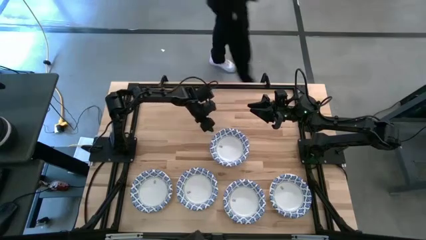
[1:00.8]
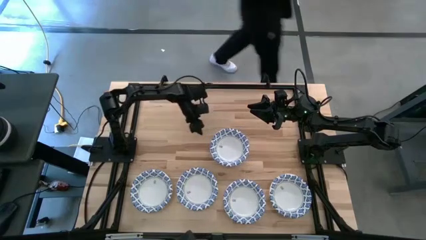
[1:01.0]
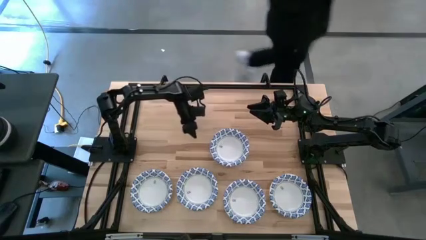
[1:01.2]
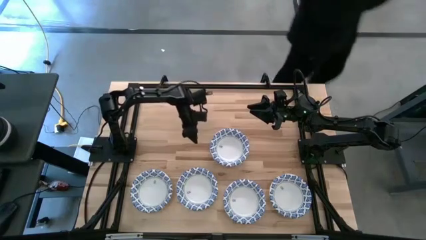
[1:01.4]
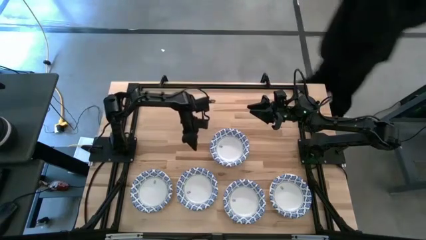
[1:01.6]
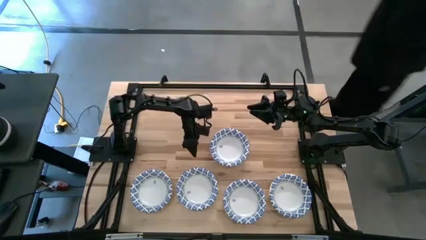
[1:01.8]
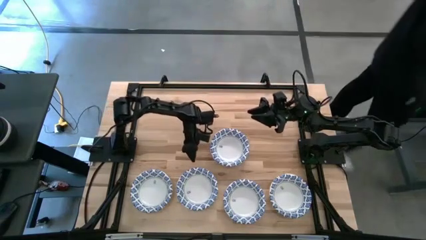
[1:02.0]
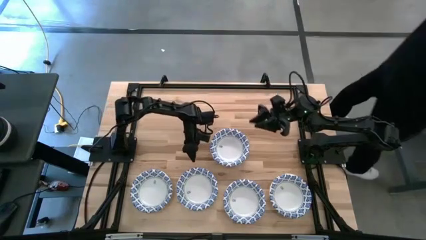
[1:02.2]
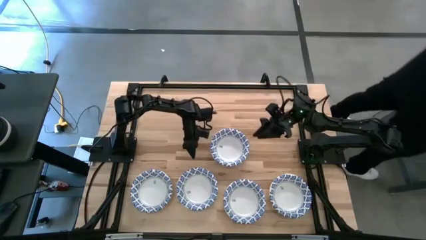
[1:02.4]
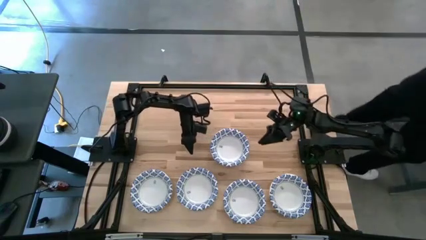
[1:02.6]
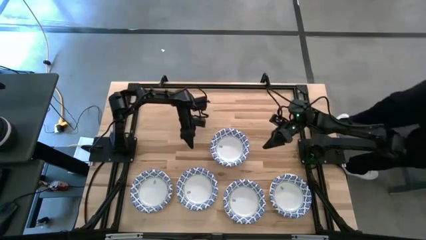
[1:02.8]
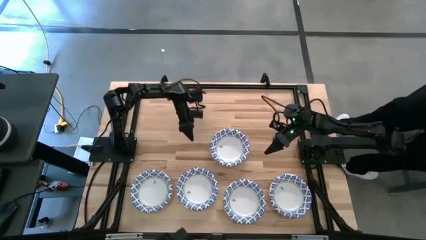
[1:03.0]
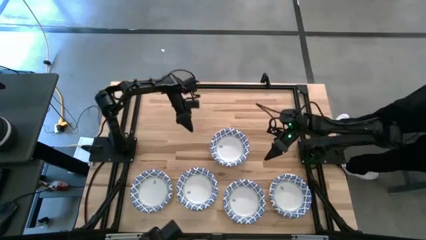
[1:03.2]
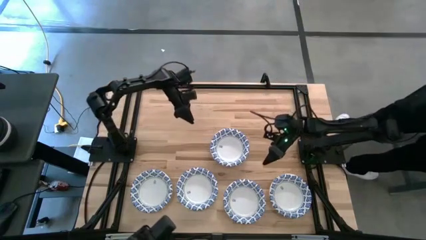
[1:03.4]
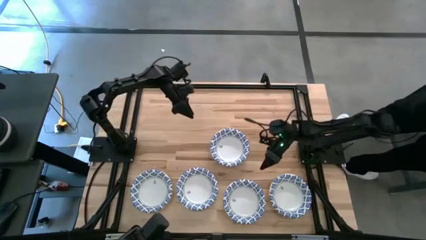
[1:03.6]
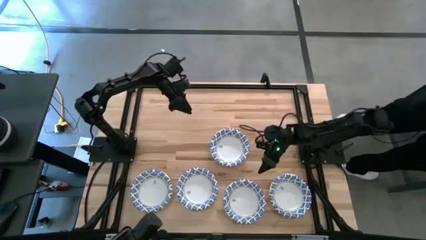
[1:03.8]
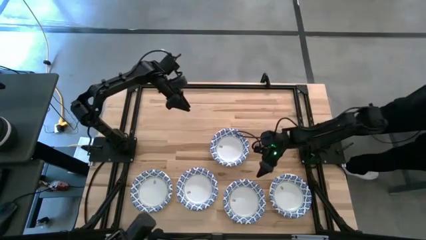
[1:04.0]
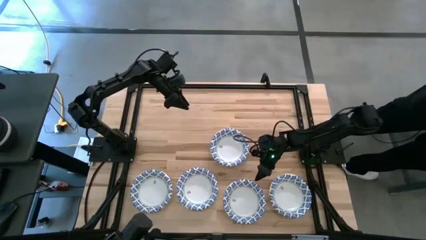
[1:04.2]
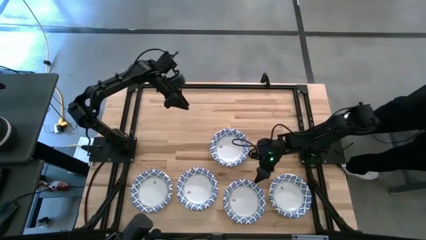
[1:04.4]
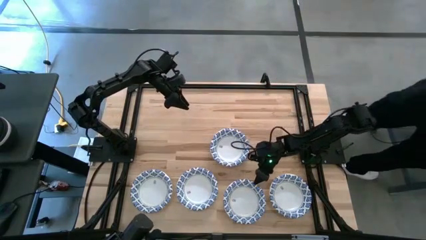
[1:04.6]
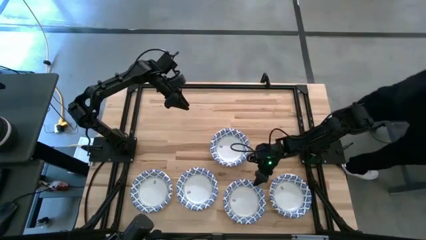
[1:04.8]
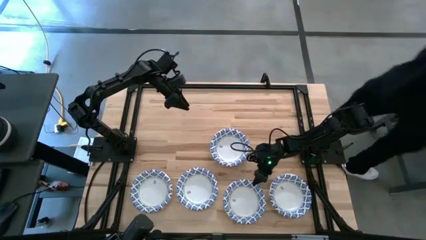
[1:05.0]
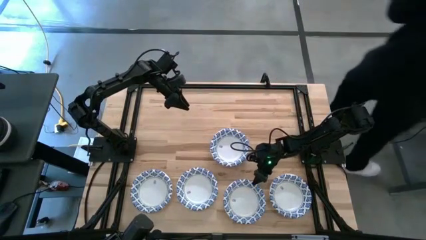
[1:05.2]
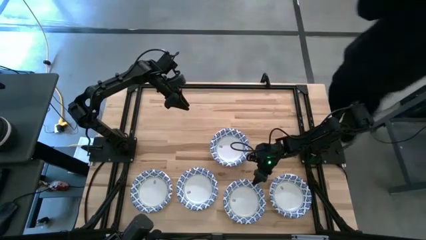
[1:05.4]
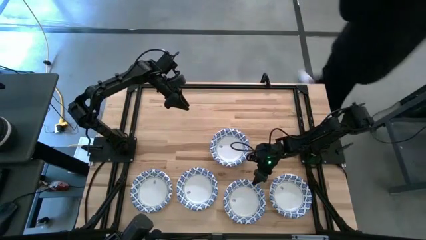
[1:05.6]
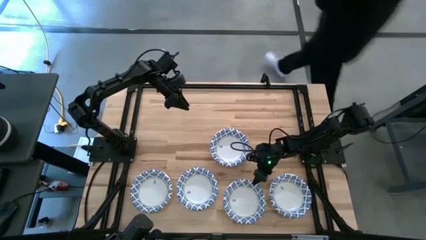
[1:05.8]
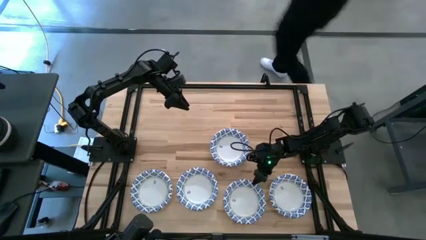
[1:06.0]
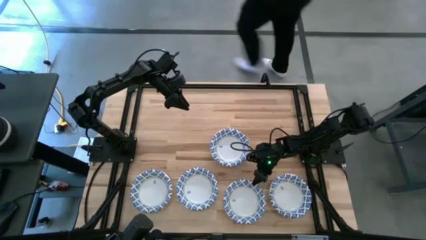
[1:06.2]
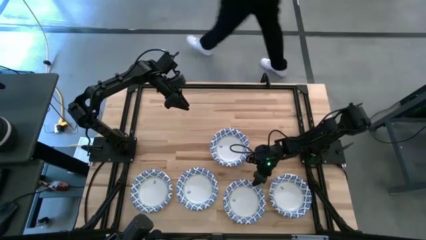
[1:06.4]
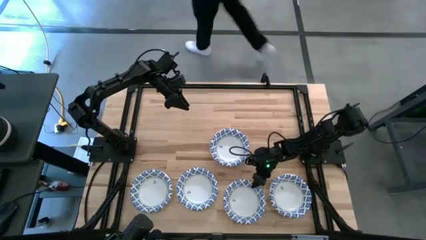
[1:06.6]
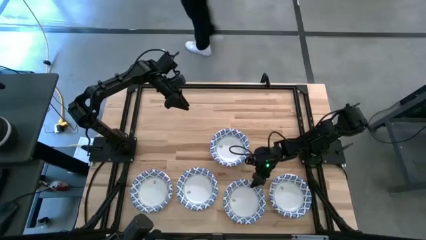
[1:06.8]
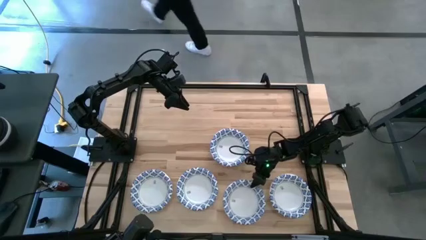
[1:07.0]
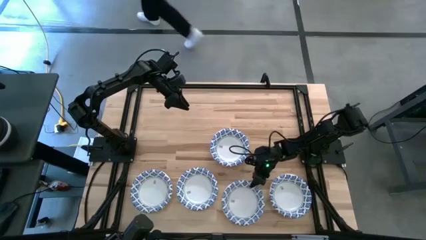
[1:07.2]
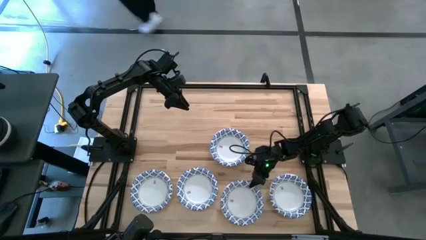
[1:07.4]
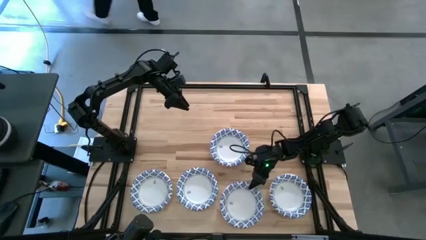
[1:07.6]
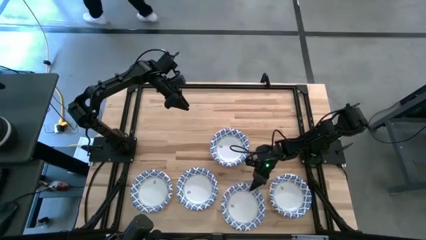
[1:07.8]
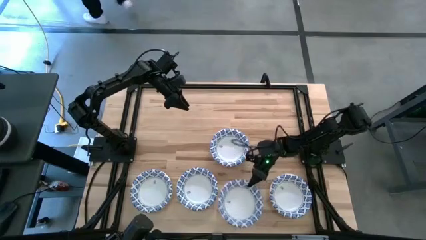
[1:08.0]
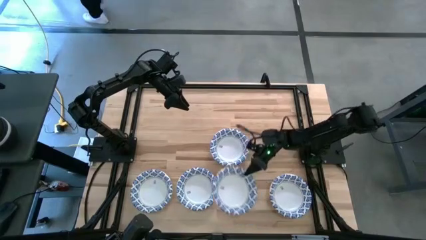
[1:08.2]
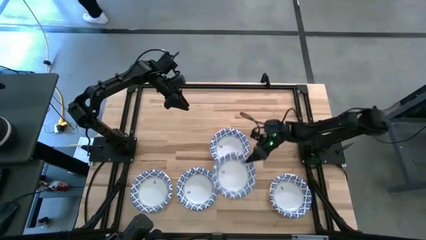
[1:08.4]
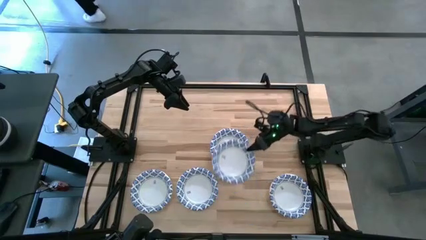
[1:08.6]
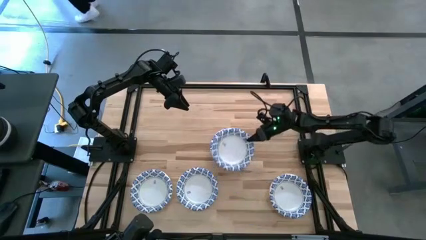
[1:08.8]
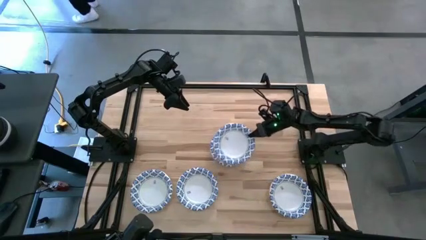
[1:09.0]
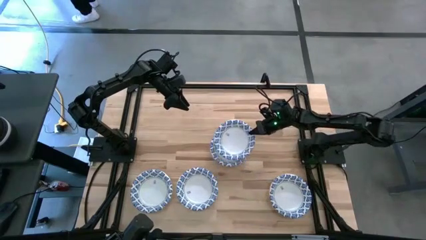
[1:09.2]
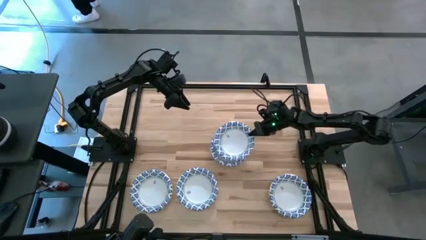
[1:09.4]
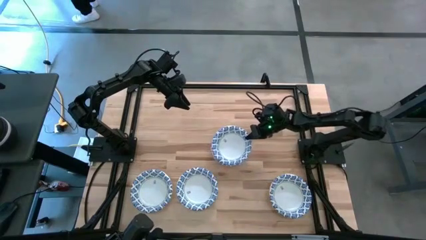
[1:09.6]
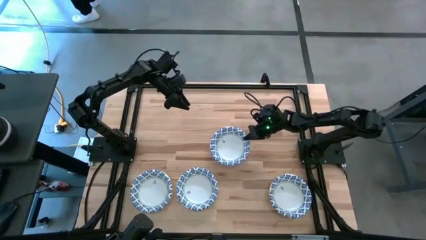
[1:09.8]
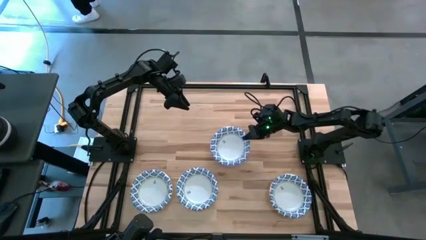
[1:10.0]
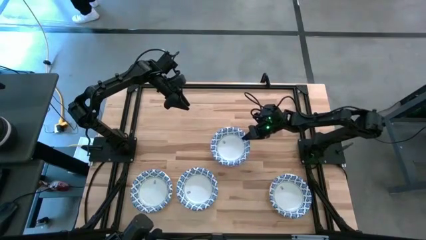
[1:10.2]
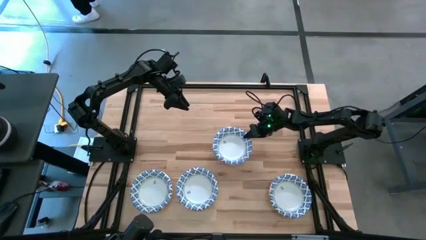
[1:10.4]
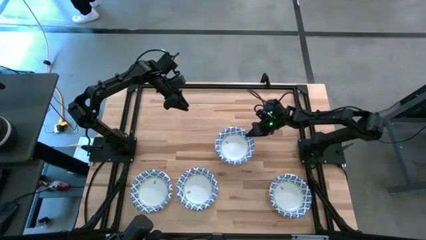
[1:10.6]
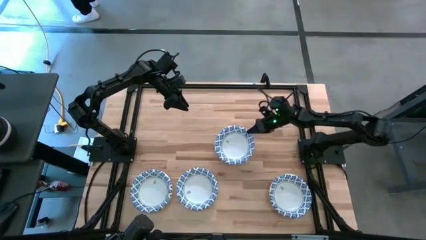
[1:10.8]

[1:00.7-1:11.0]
Task: Nest bowls inside each other
Stack the white patterned bowl on top of the other white patterned bowl

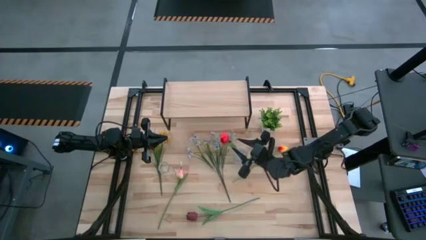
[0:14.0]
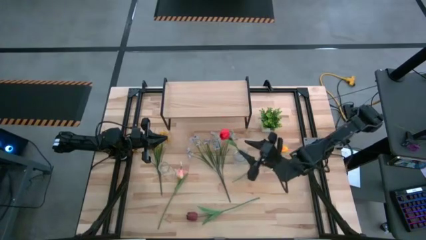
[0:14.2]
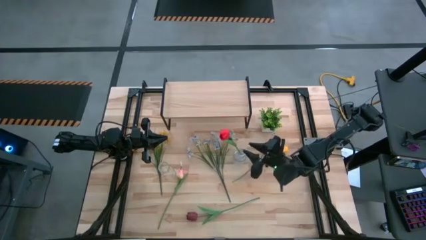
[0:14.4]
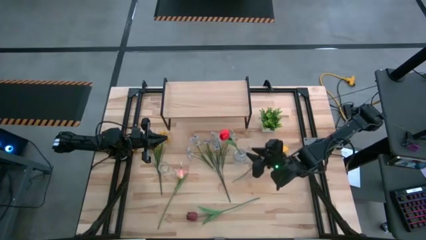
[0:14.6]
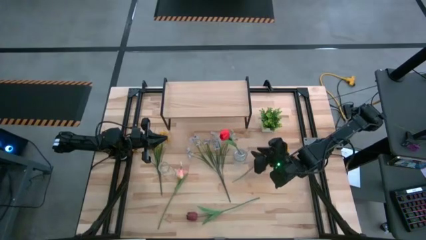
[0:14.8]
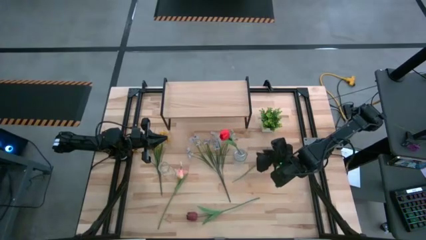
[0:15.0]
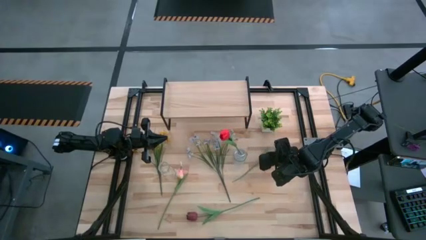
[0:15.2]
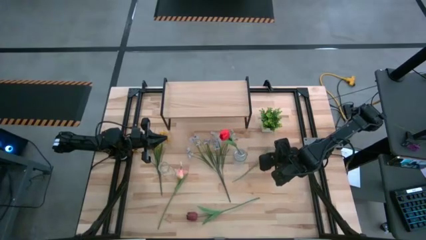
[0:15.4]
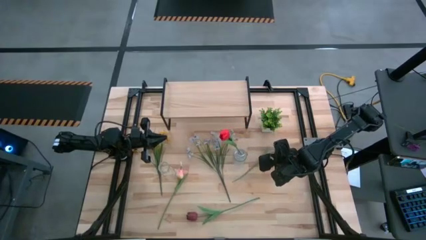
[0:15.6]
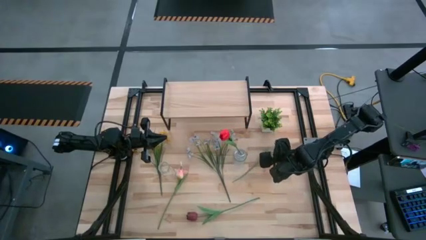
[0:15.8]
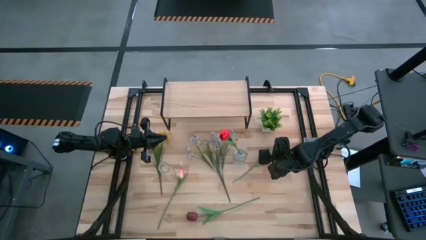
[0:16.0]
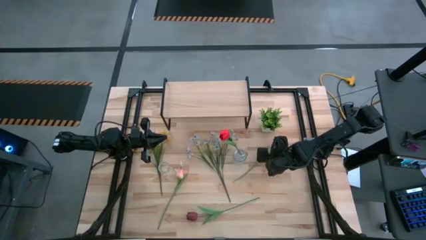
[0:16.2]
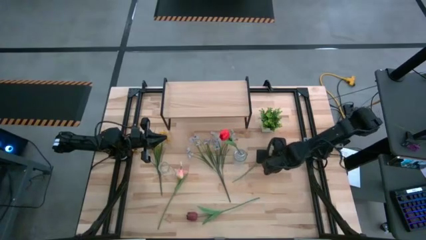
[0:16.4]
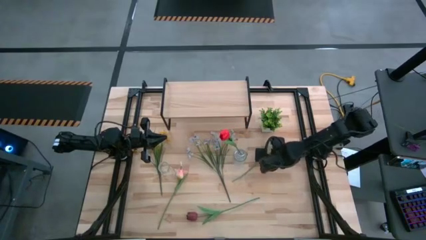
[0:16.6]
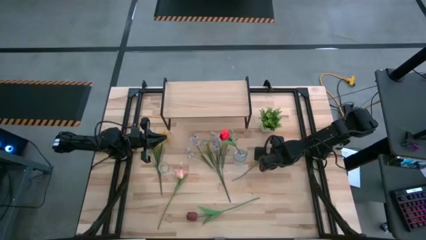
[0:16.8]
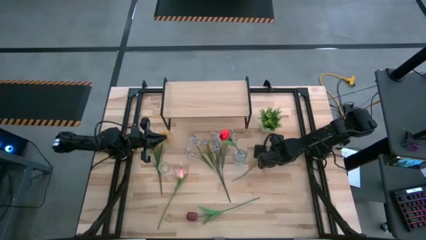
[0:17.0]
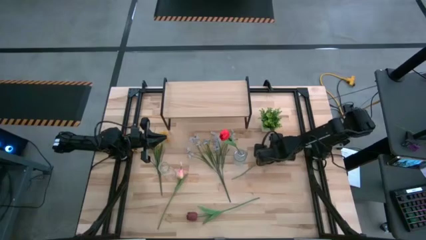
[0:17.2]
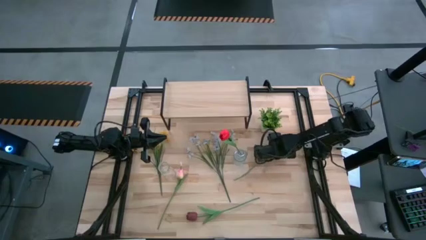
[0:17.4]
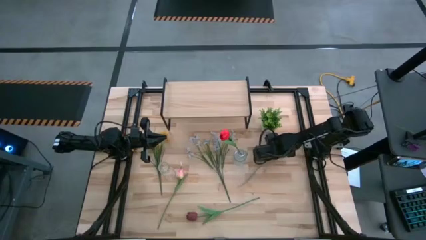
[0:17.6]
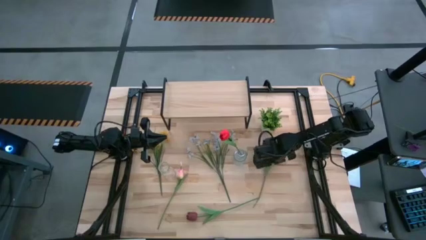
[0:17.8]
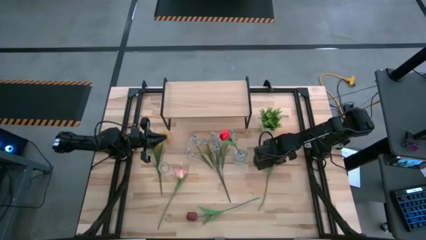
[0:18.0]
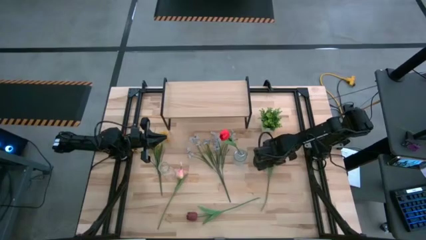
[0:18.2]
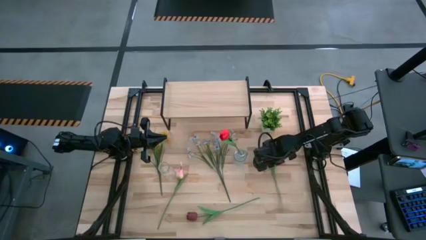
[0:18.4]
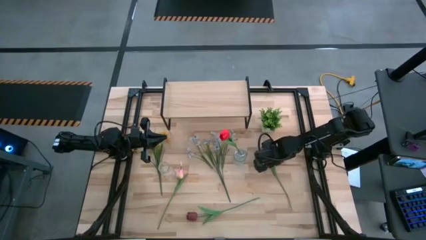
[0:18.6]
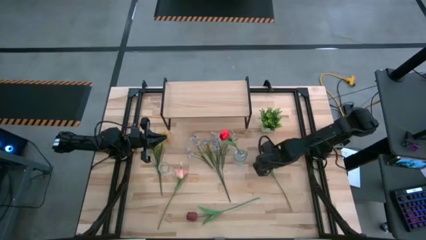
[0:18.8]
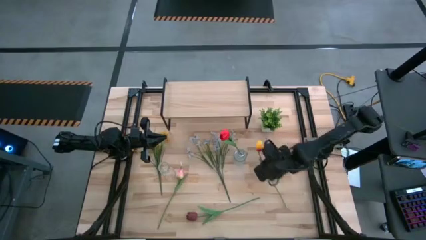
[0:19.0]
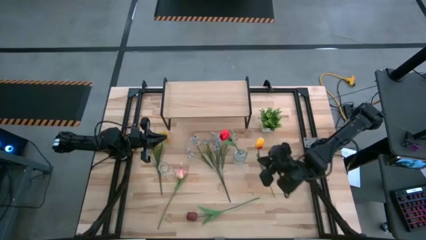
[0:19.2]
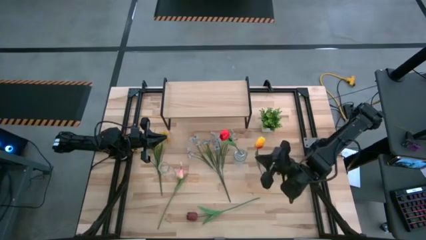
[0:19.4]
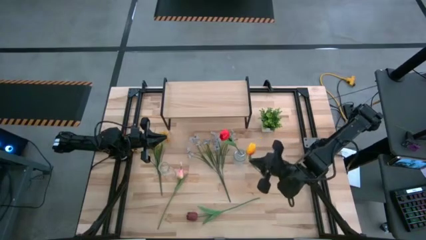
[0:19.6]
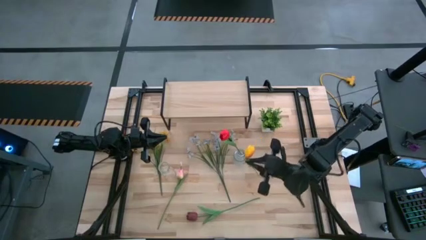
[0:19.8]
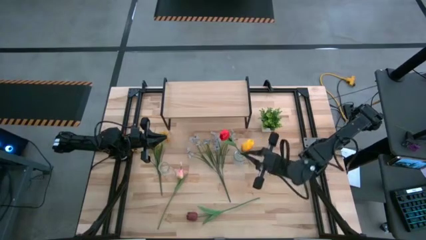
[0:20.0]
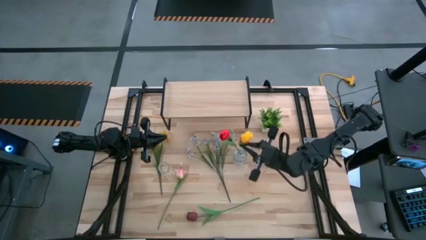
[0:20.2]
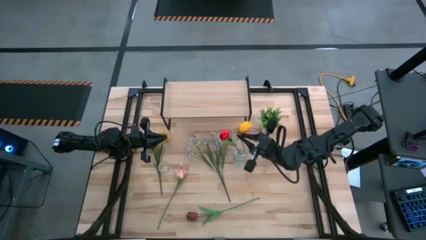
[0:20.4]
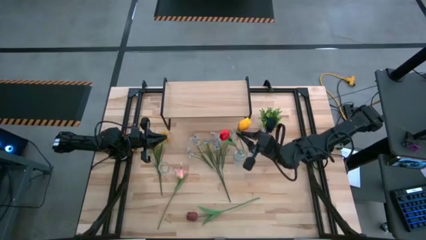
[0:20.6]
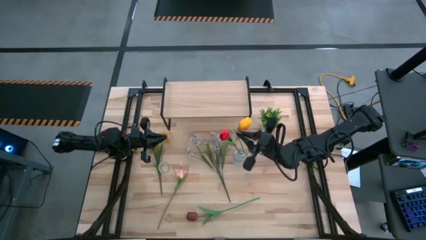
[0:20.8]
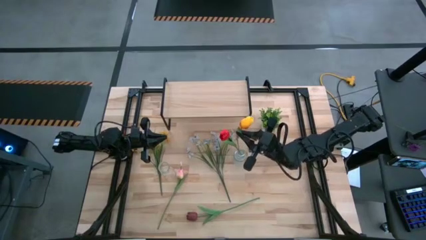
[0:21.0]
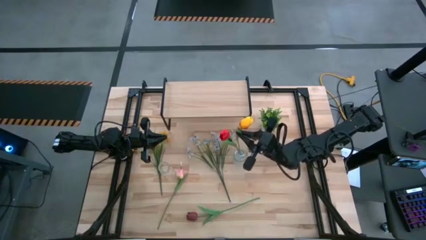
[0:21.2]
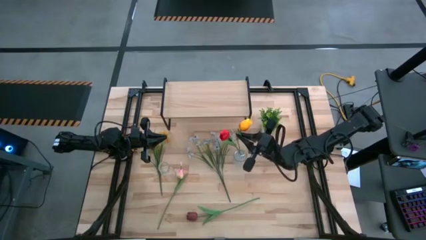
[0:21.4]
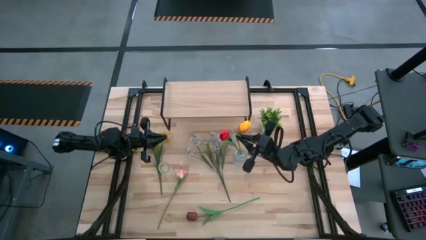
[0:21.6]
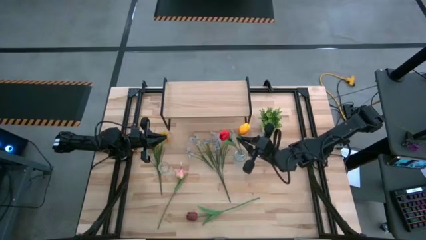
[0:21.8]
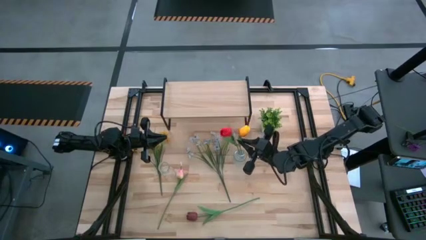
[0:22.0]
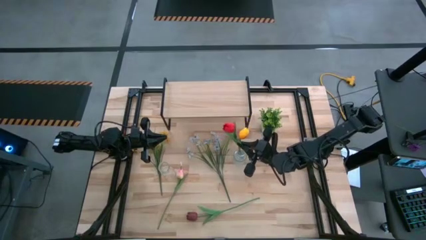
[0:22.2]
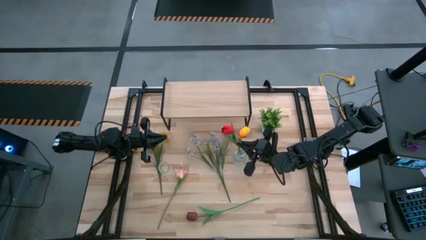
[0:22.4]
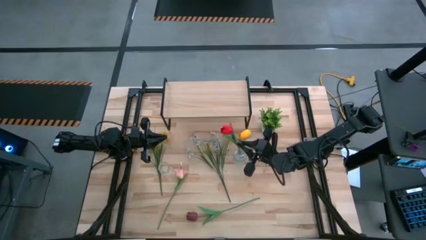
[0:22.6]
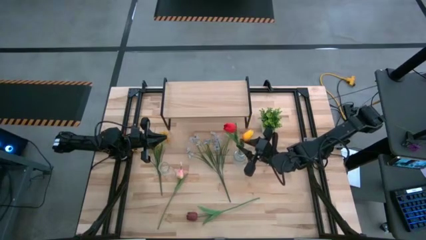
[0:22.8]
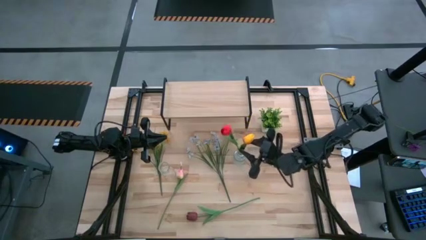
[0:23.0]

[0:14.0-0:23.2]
Task: Pick and place flowers into a vace then onto a shelf
Put the yellow tulip into the top transparent vase
